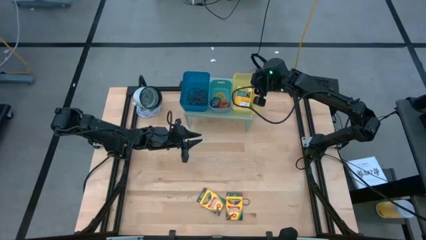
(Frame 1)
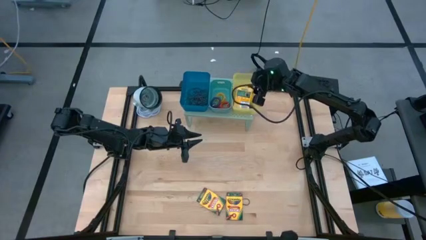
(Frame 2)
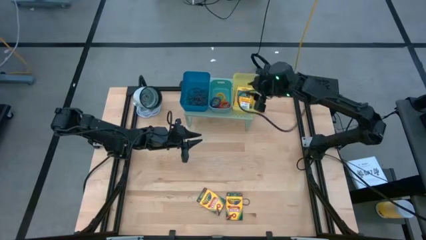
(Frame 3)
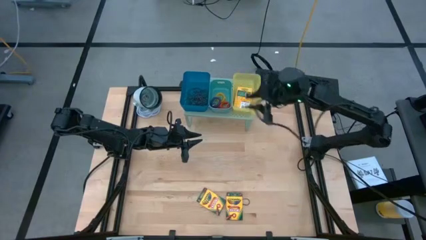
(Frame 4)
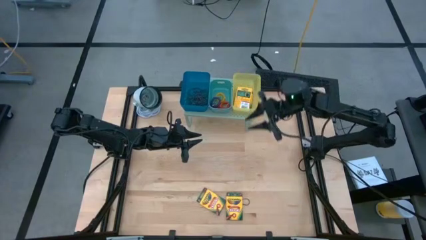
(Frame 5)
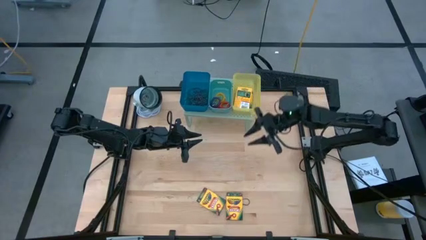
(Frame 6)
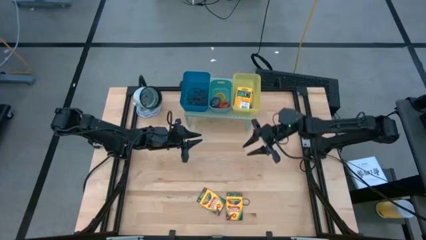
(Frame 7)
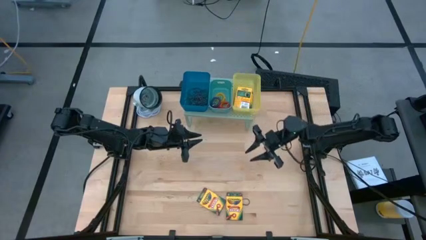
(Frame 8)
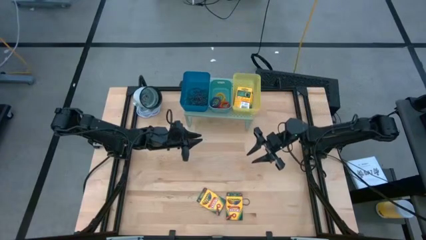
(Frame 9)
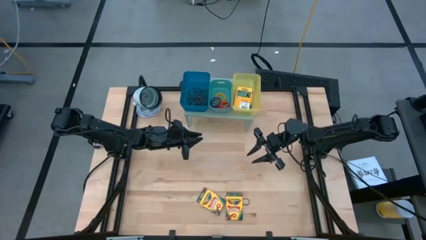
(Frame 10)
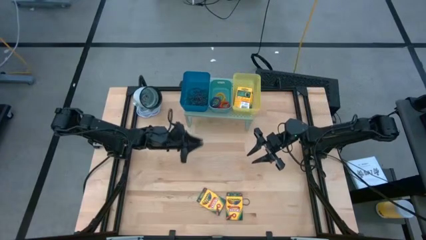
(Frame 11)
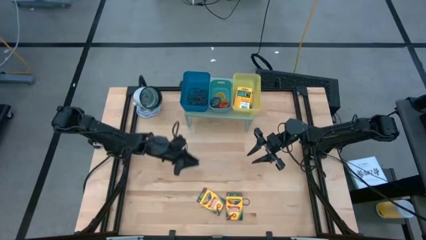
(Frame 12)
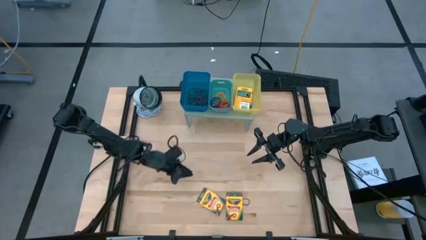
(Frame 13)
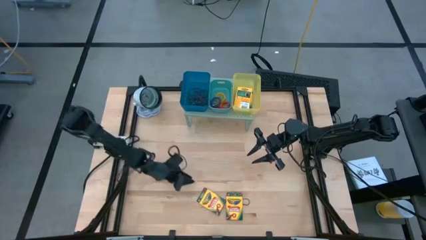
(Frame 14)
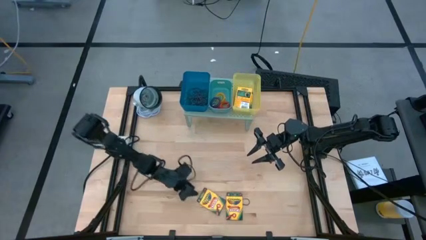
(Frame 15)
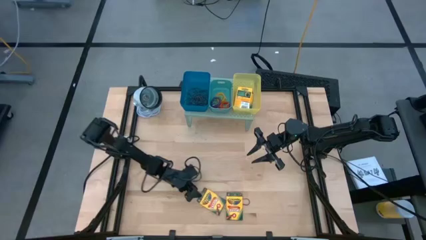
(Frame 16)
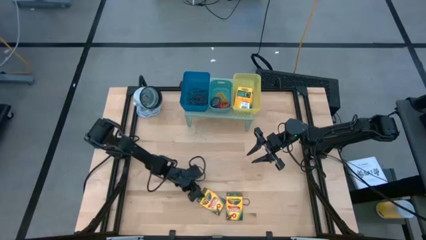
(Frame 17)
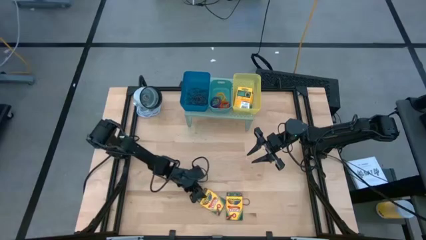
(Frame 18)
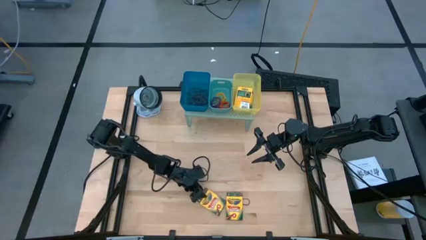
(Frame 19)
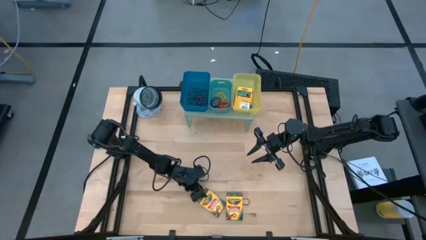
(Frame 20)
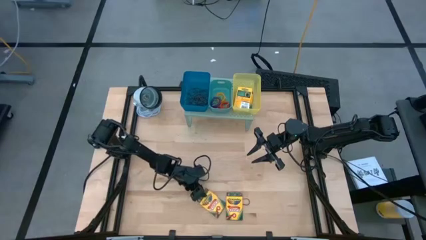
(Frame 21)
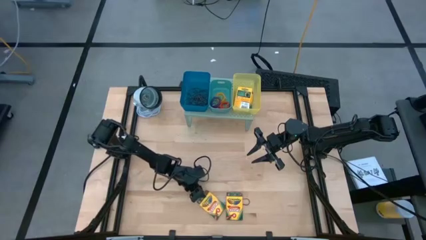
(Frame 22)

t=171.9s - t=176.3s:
Task: Pick & Place Office Desk Supplies
Put the yellow crayon box into the yellow bin on the shelf

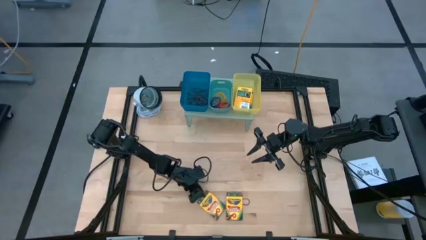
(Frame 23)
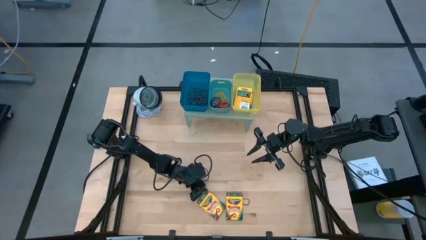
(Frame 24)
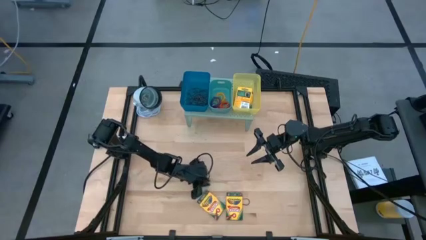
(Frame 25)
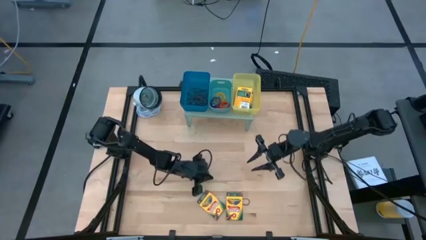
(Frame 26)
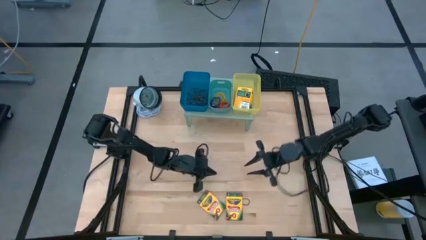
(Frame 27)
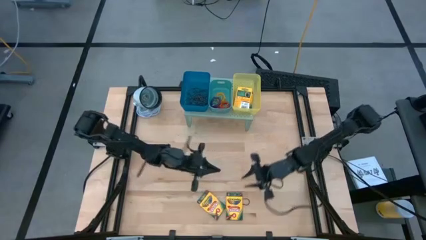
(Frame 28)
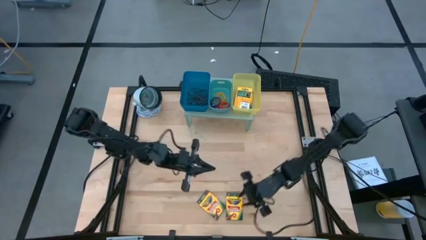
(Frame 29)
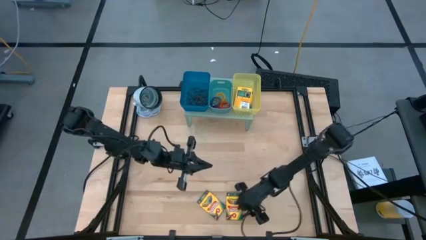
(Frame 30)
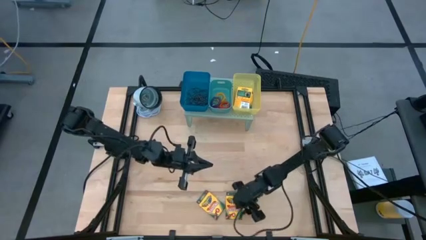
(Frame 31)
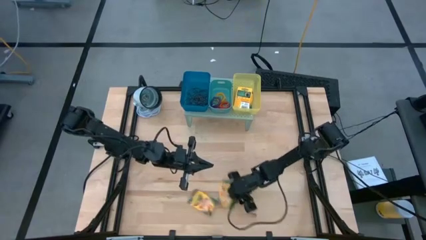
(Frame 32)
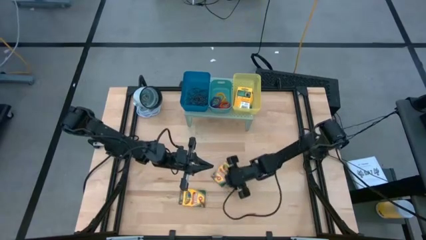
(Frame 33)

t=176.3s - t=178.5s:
Adjust the yellow crayon box on the table

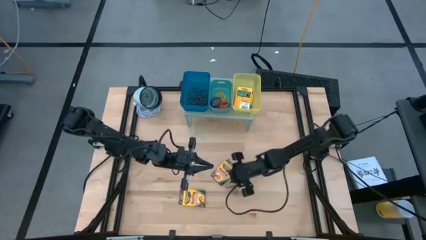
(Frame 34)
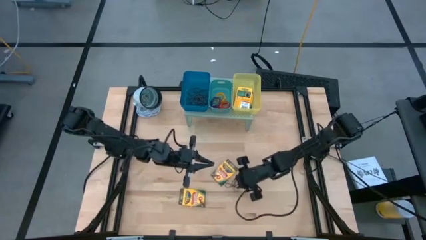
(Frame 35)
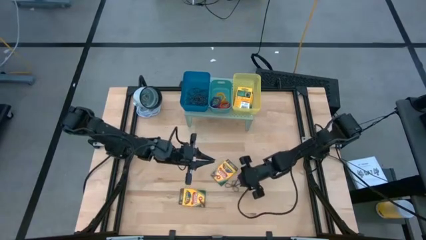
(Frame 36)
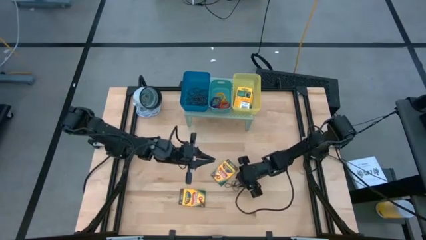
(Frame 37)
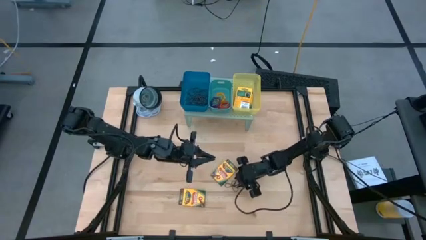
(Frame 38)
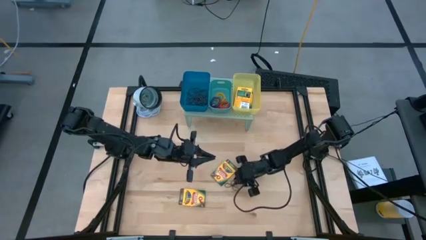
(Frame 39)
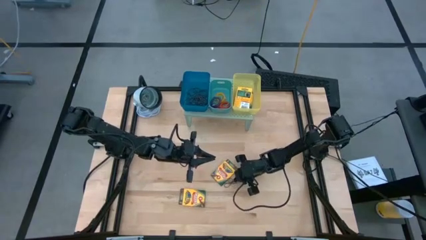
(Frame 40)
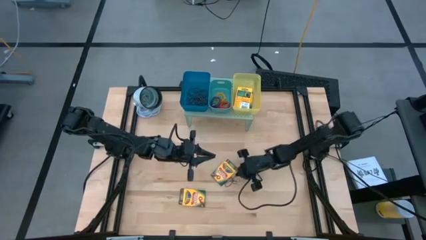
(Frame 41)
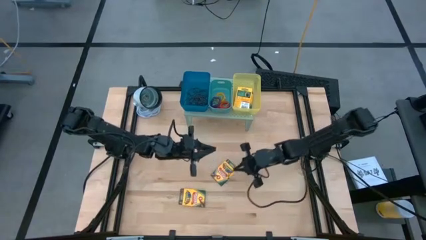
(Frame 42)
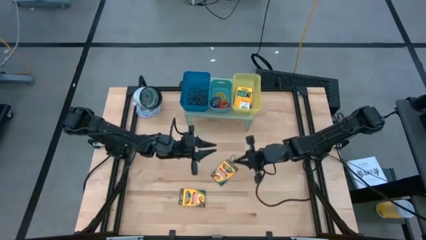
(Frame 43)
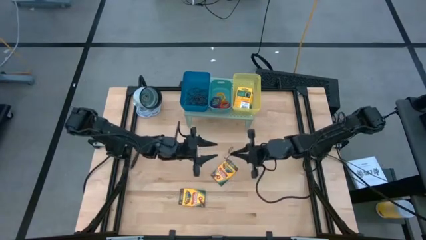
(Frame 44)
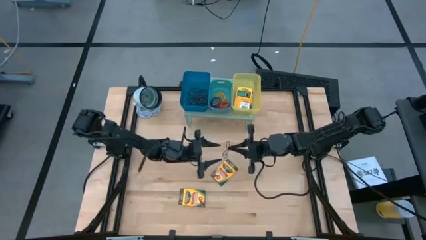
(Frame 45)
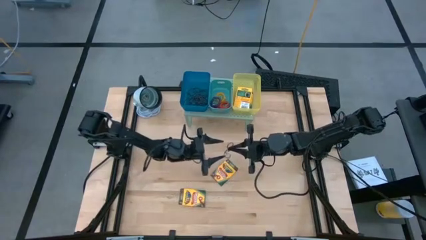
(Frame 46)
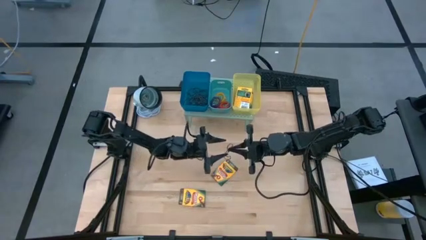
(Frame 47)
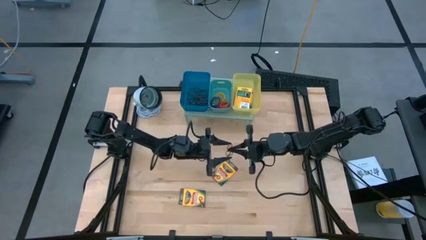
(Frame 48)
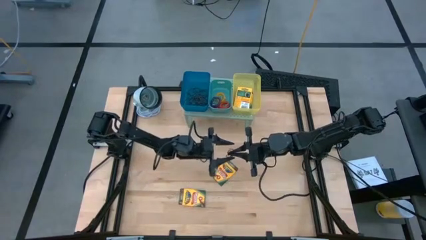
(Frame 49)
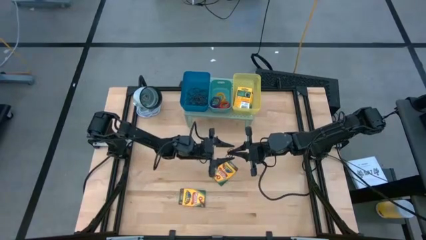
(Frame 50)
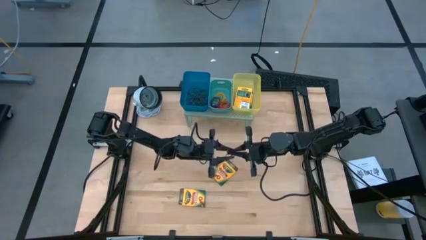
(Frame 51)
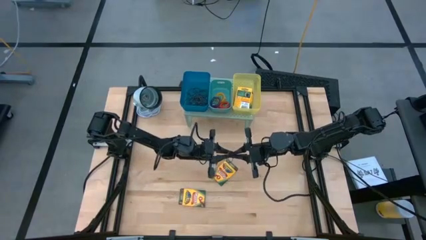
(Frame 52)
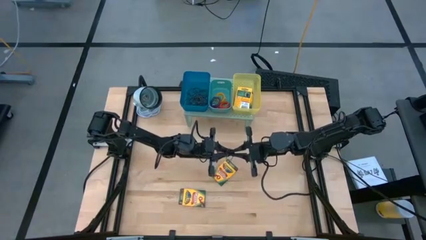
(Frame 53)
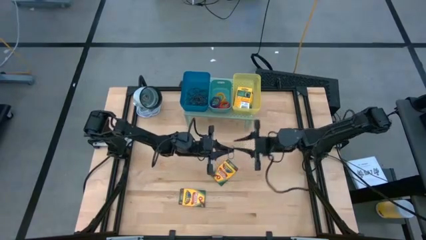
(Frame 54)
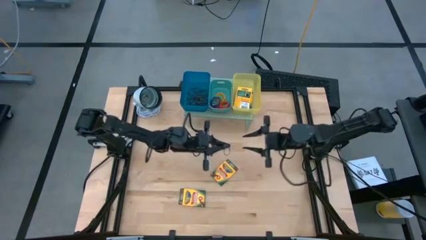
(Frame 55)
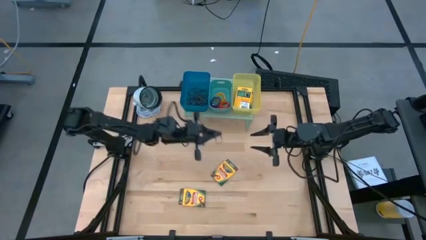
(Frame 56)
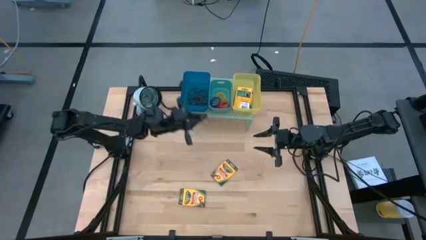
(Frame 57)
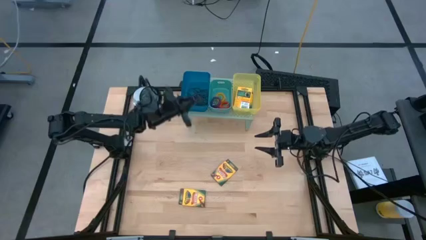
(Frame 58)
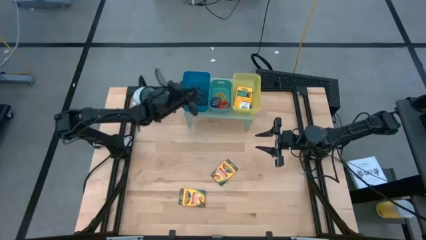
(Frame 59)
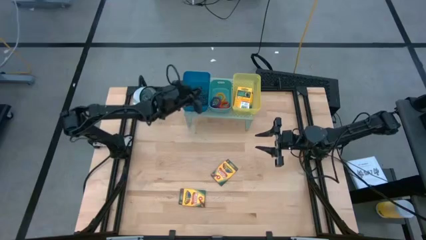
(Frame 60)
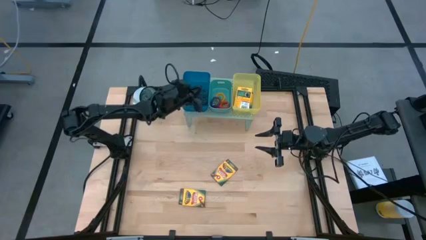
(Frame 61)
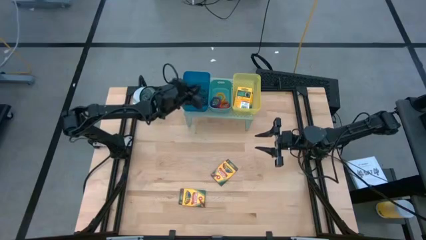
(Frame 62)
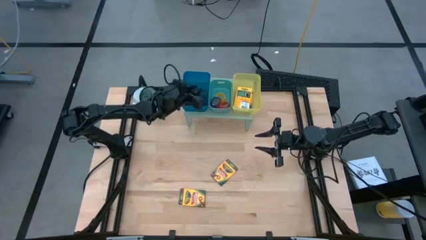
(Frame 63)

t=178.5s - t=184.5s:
Put the purple rubber band into the blue bin on the shelf

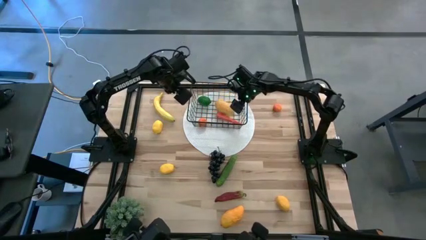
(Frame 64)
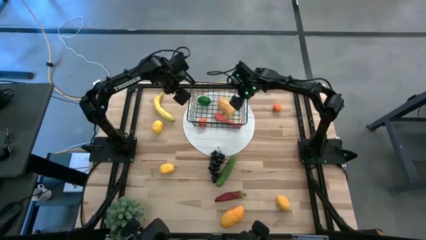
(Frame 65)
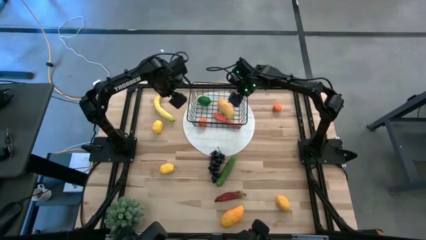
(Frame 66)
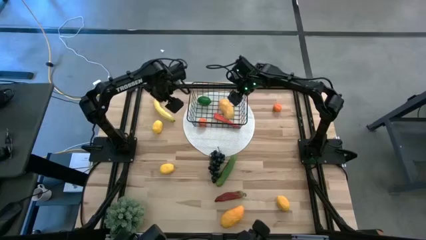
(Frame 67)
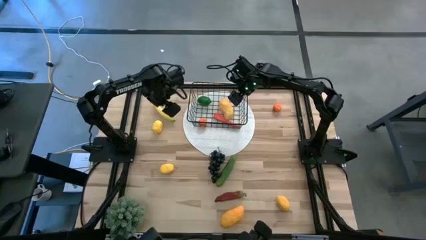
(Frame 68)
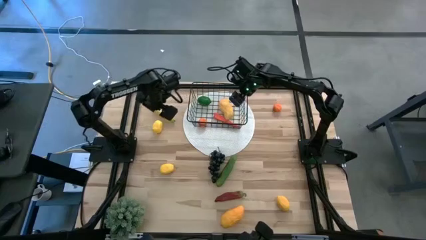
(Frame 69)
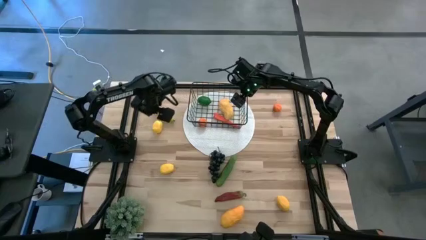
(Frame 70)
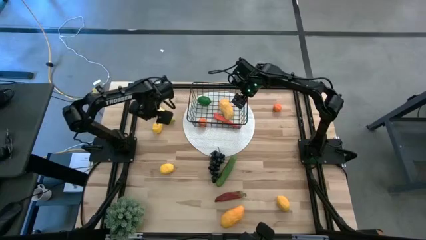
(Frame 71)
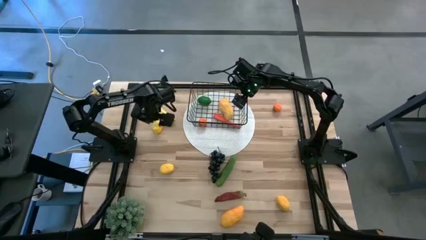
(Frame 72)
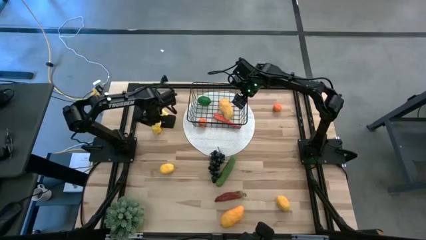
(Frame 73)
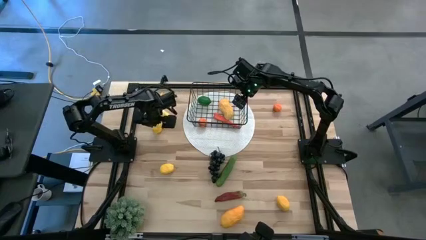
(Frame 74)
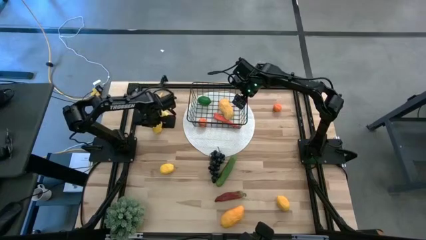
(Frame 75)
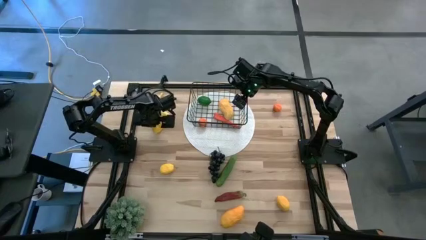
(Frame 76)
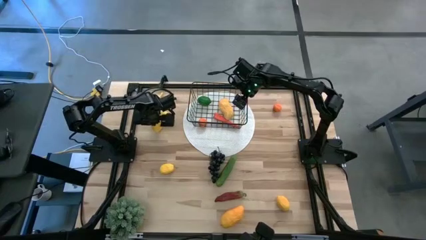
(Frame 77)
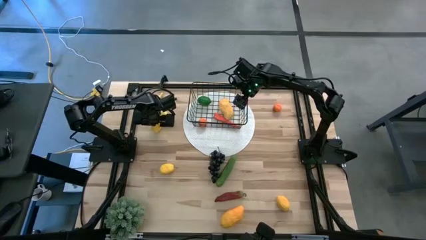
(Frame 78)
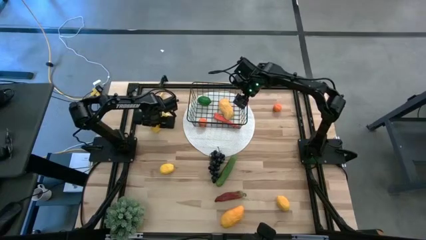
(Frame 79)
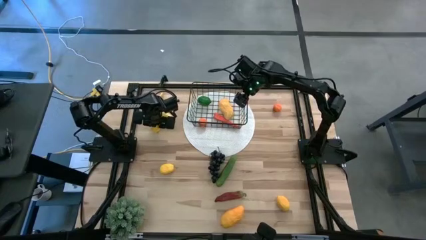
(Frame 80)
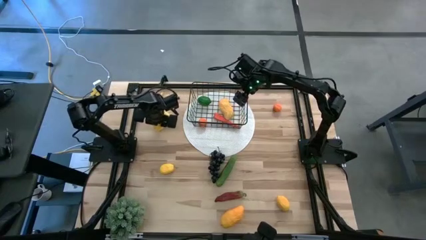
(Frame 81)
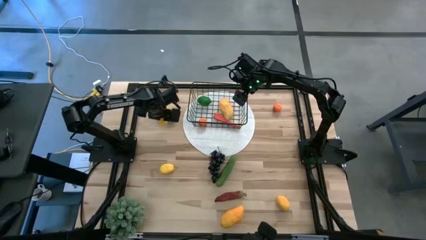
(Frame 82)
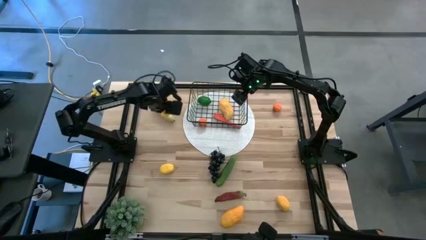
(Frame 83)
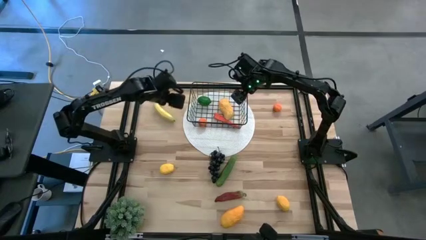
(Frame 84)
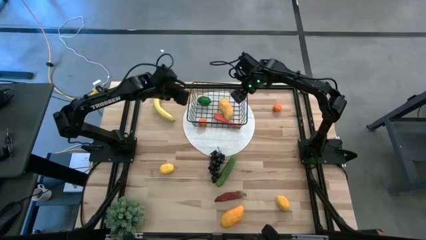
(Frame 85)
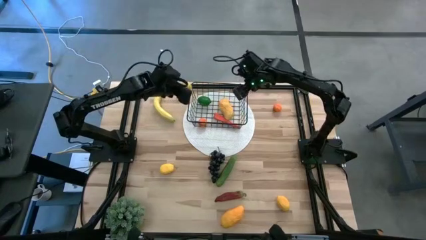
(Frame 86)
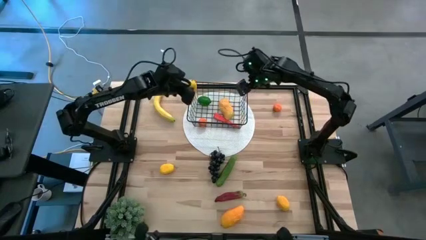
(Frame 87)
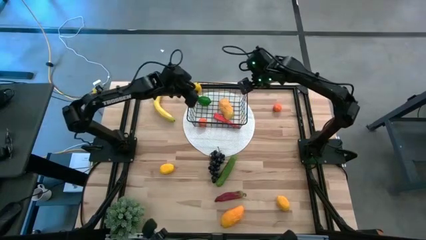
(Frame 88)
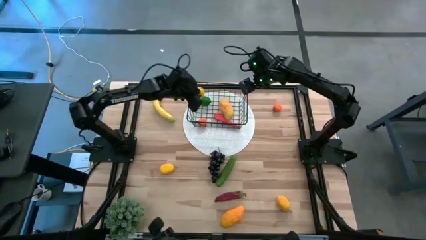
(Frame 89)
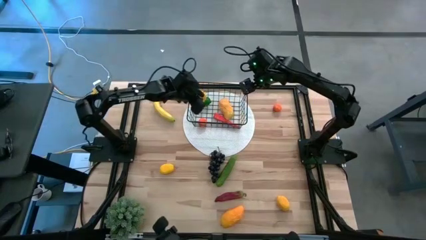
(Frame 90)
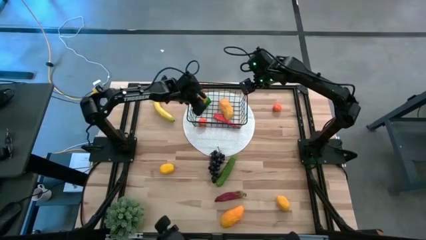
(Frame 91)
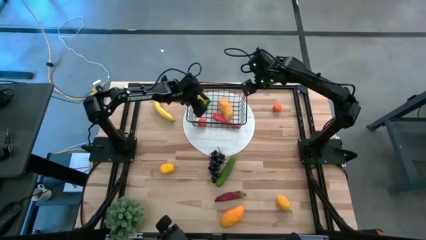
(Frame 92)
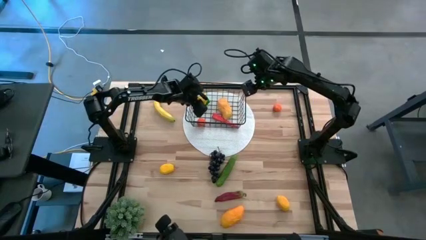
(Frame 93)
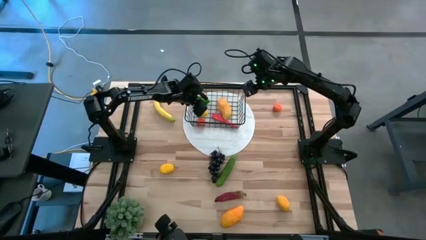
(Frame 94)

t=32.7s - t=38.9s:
Task: Build produce basket
Put the top yellow lemon into the black wire basket
